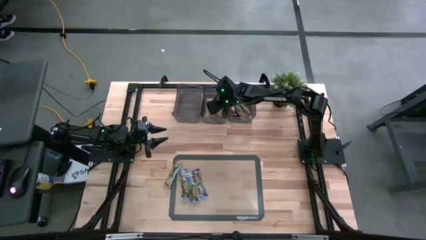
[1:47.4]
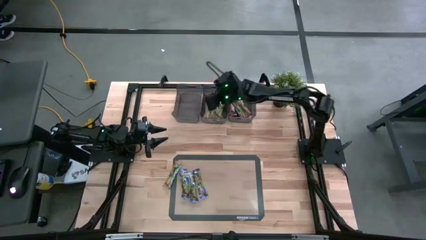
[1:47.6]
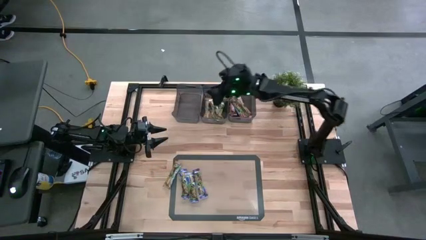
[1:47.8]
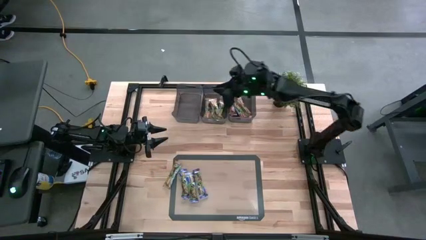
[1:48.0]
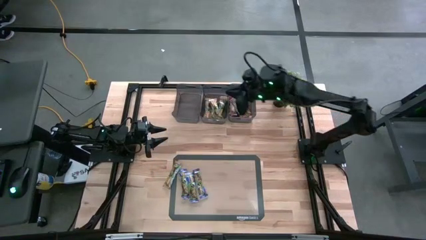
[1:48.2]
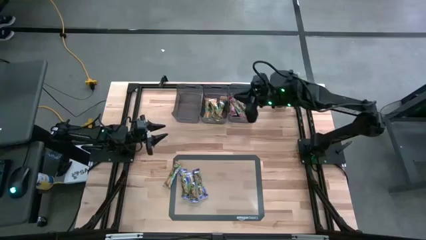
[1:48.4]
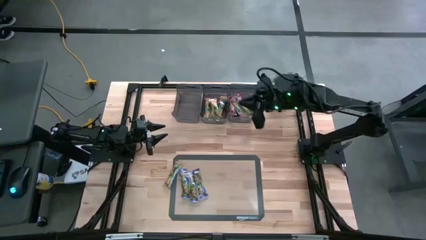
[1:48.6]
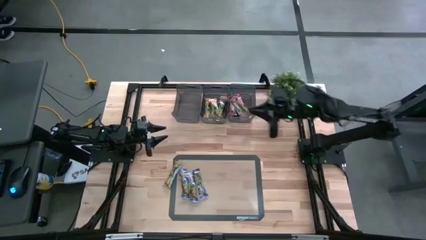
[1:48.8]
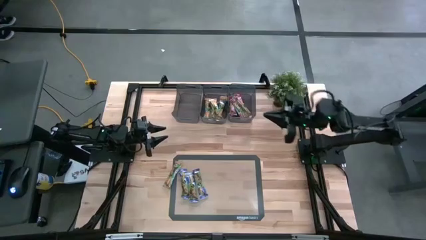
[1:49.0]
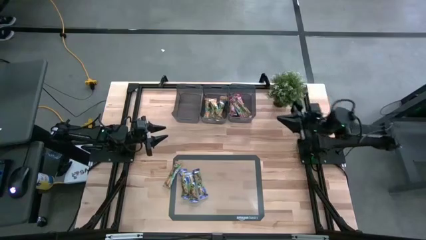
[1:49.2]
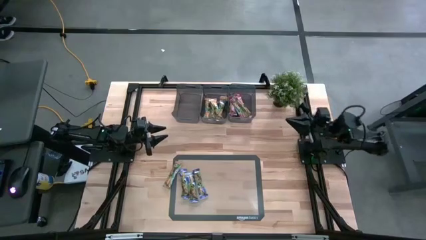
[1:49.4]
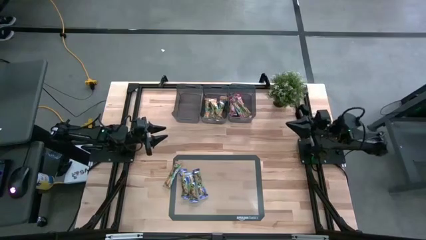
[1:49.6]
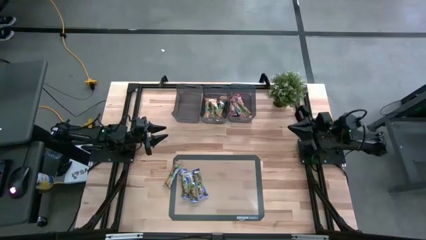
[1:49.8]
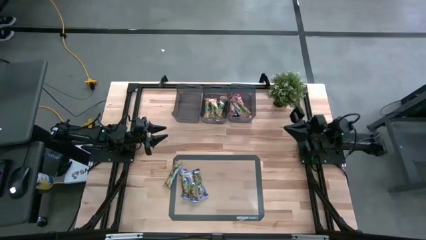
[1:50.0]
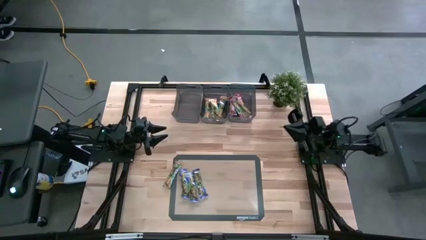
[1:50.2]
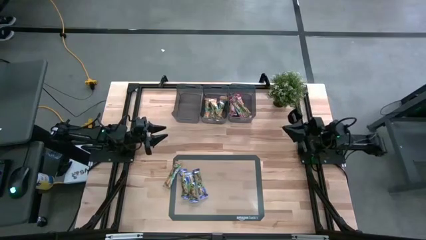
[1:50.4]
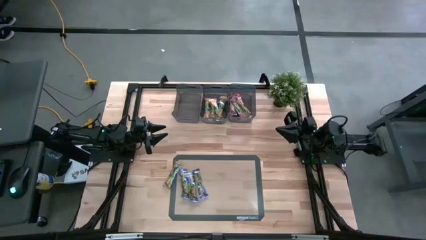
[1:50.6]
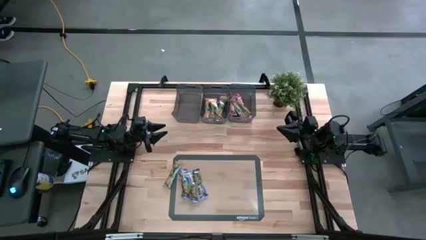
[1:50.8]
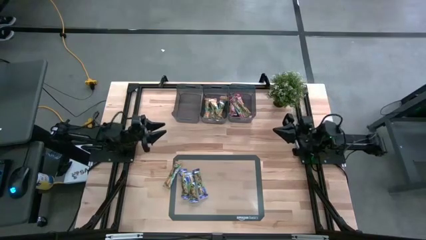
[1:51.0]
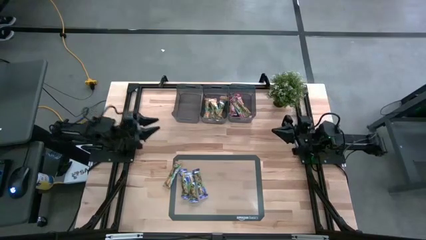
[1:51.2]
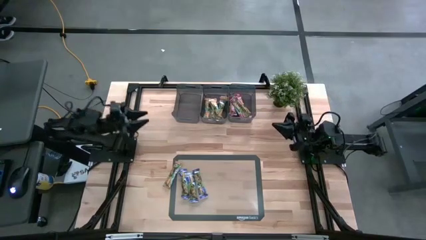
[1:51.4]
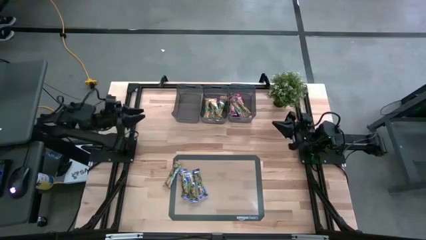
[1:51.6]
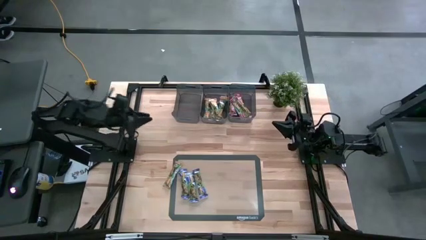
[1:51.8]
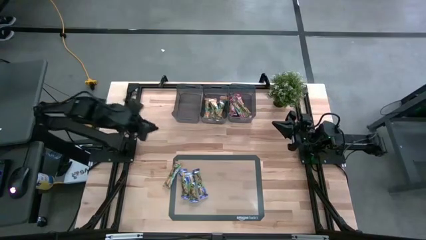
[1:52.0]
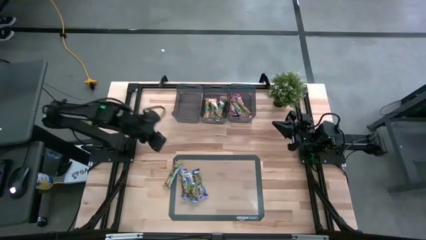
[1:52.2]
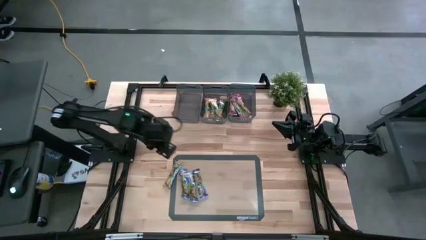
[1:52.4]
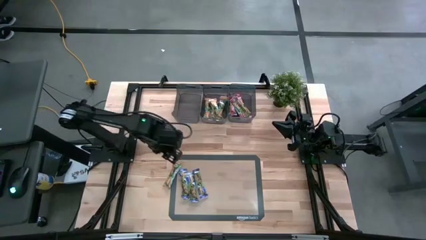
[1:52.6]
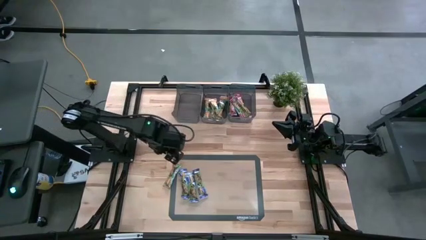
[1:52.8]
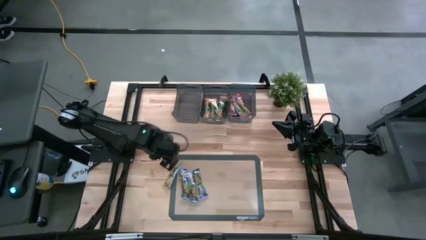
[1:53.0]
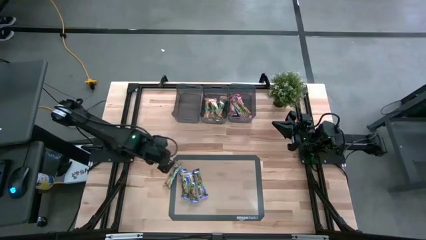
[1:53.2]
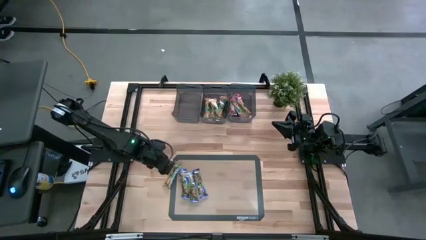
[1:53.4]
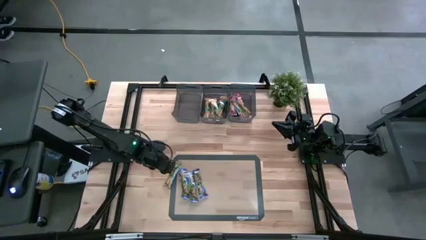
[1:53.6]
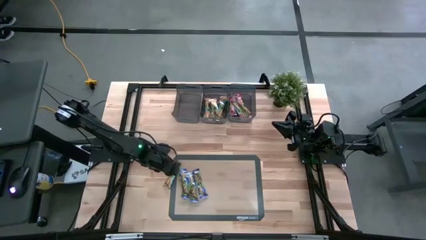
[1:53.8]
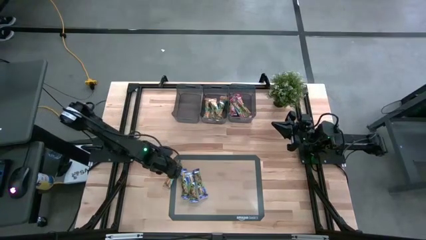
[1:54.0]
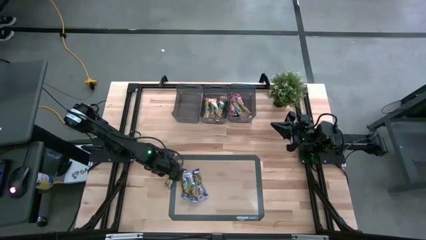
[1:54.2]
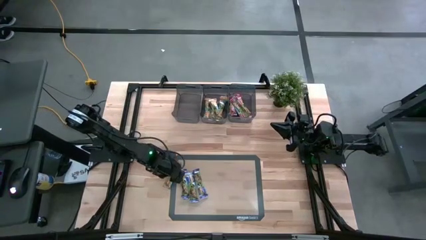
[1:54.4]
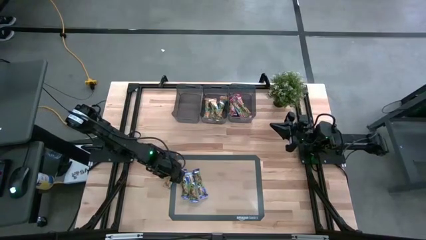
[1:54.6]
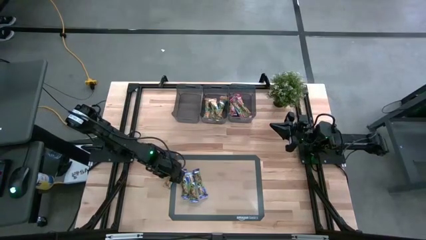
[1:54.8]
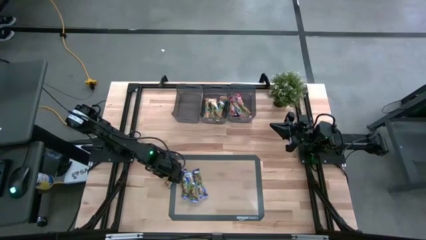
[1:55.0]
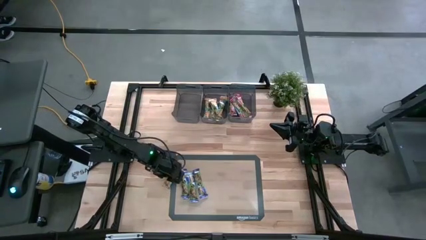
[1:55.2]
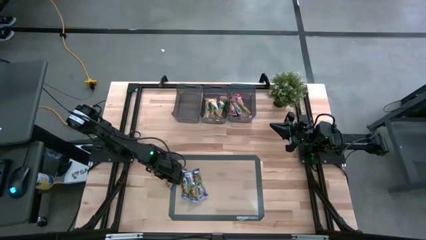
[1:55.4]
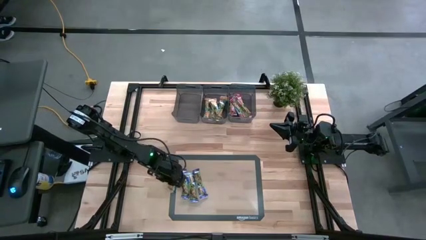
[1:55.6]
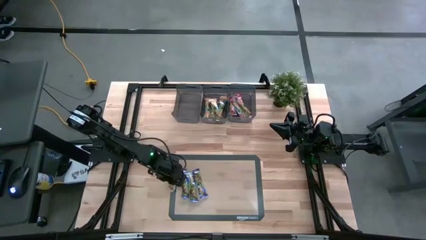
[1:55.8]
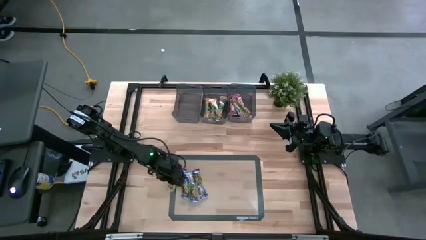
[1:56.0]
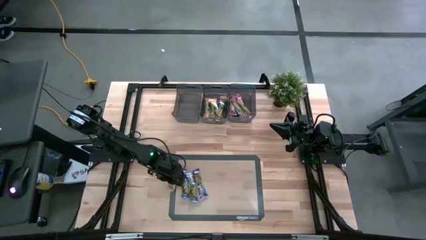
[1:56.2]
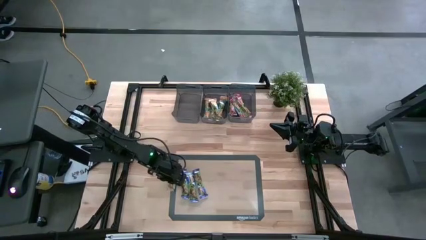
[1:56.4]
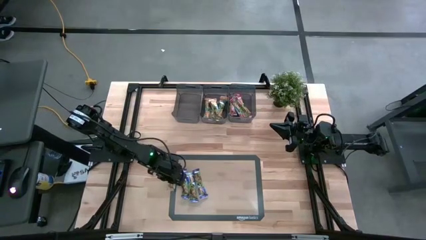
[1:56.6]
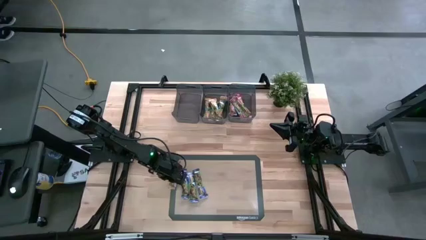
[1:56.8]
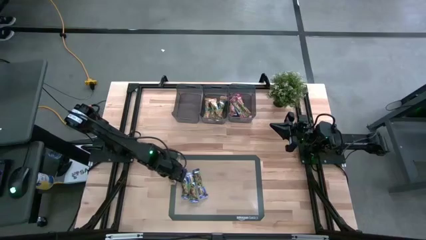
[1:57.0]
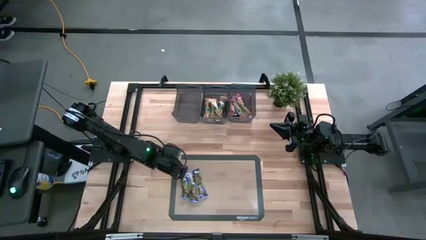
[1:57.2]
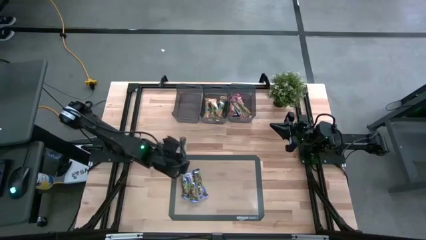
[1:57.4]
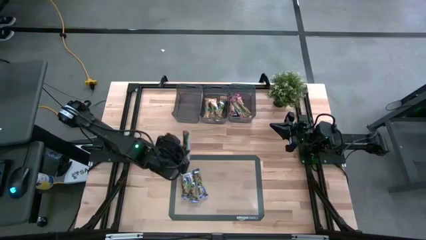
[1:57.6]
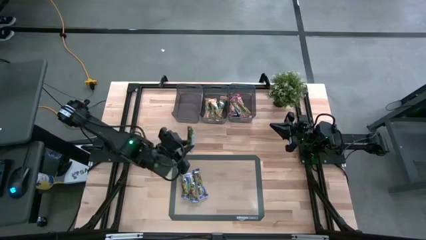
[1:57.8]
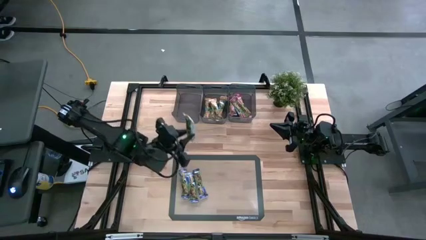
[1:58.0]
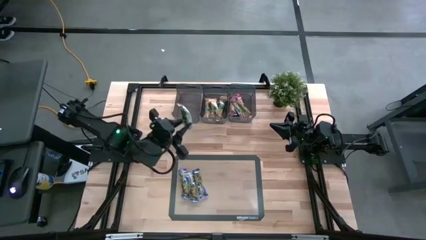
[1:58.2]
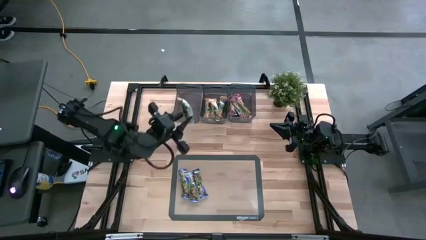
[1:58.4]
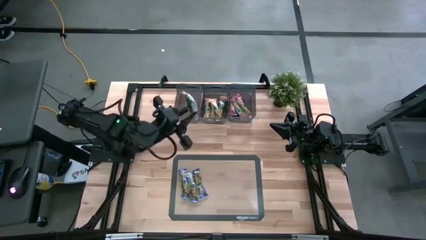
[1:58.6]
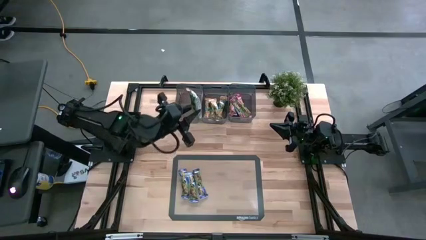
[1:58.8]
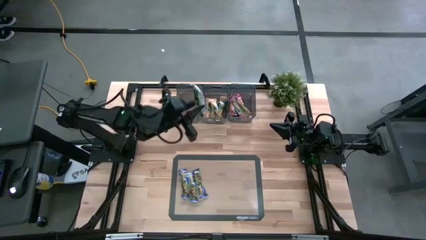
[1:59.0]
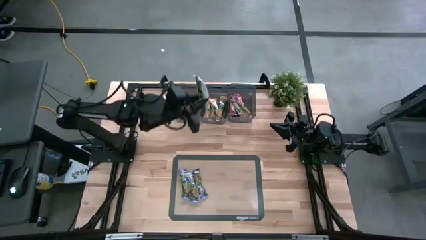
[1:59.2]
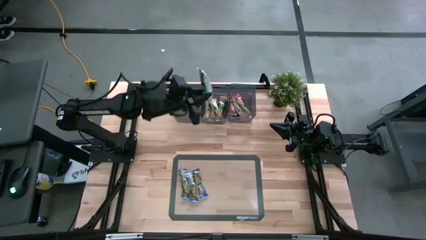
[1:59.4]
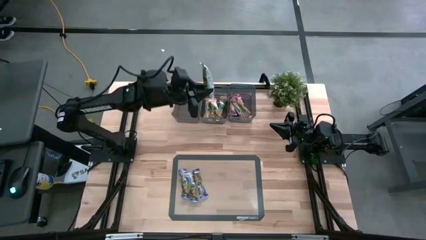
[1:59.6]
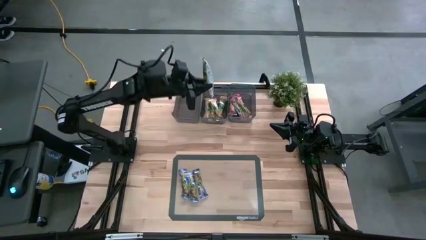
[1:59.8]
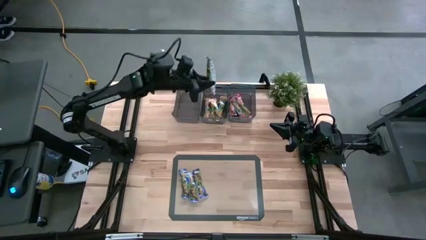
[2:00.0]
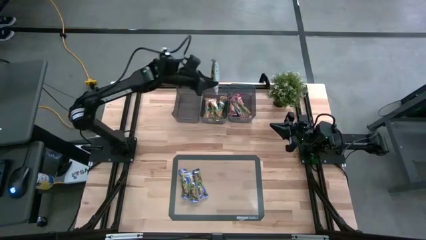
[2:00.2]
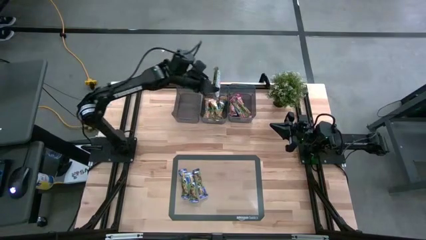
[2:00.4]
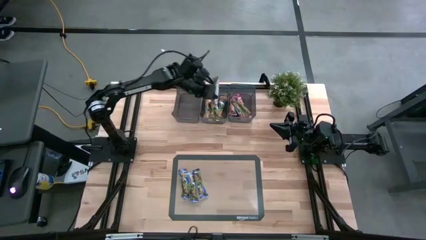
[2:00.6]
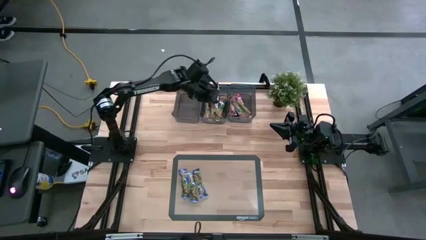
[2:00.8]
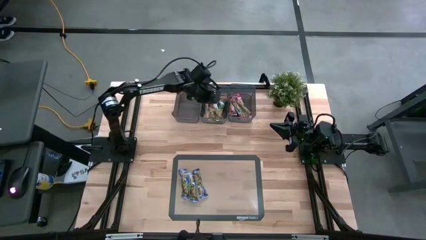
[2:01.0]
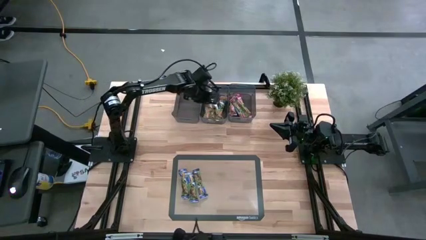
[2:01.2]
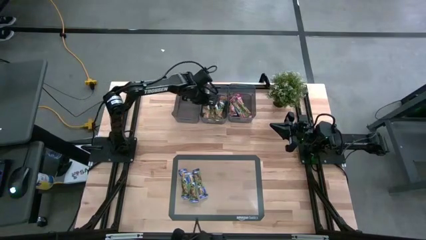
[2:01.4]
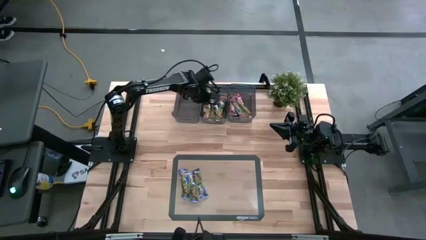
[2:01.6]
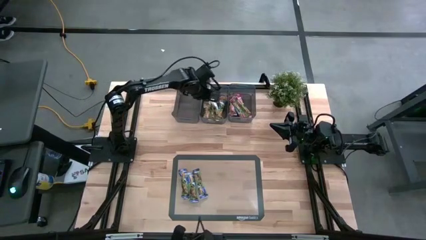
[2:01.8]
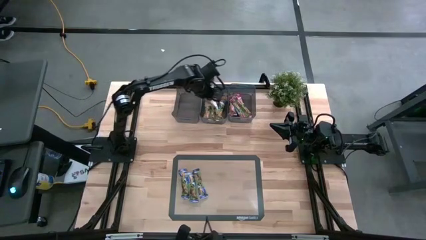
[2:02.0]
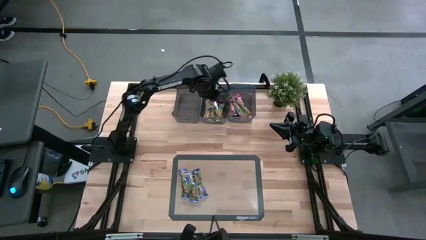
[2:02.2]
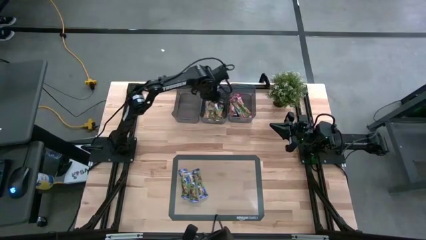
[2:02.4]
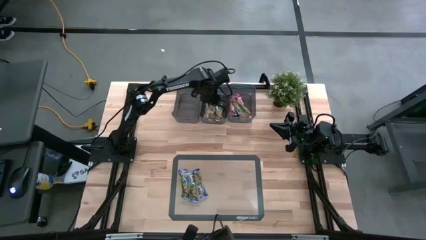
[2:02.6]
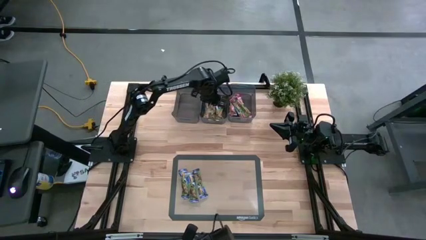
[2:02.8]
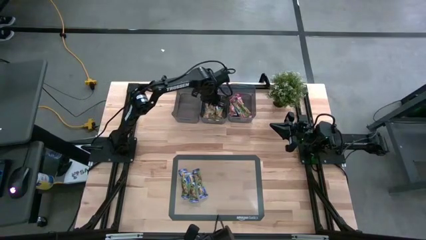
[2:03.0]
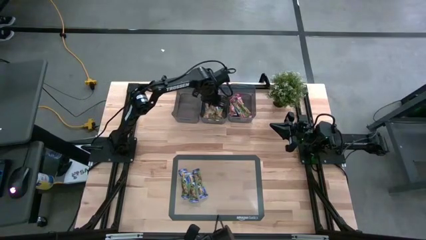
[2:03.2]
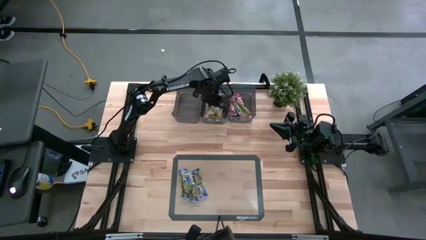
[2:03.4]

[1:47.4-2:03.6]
Task: Pick and place Granola Bars by type
Put the orange granola bar into the middle black bin
